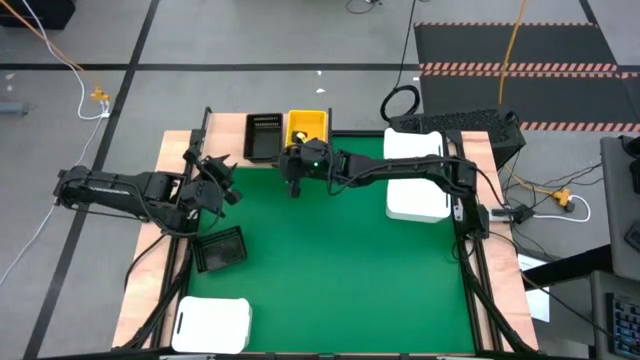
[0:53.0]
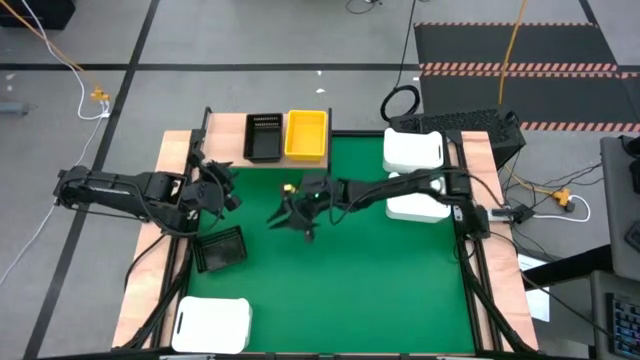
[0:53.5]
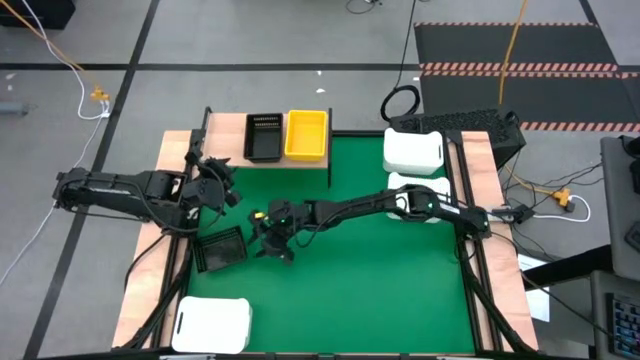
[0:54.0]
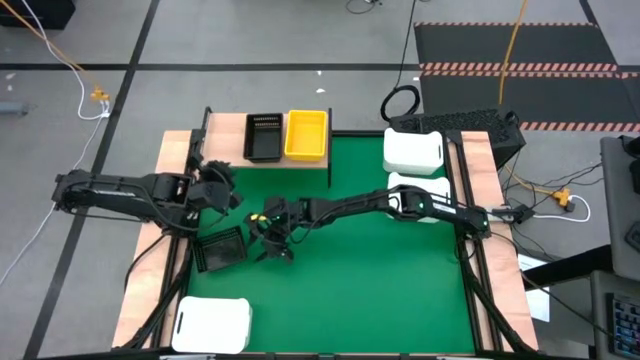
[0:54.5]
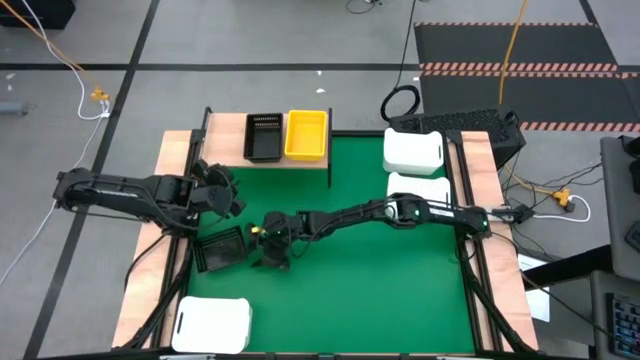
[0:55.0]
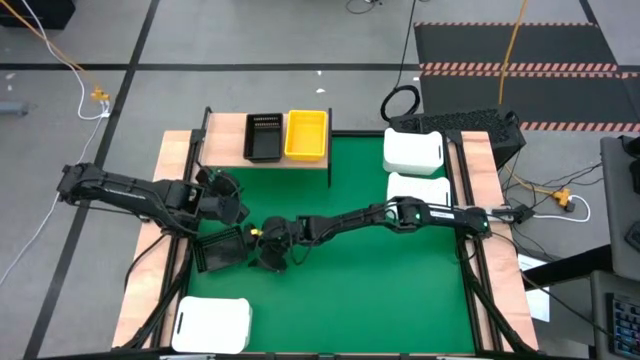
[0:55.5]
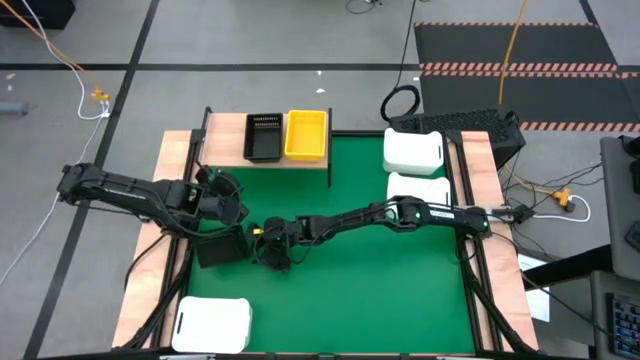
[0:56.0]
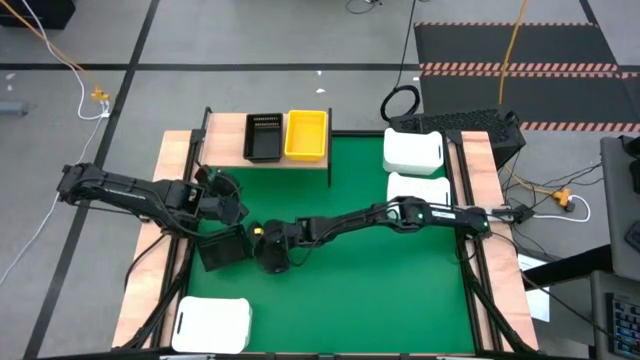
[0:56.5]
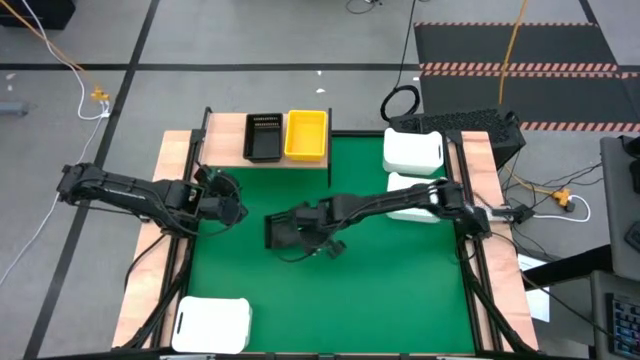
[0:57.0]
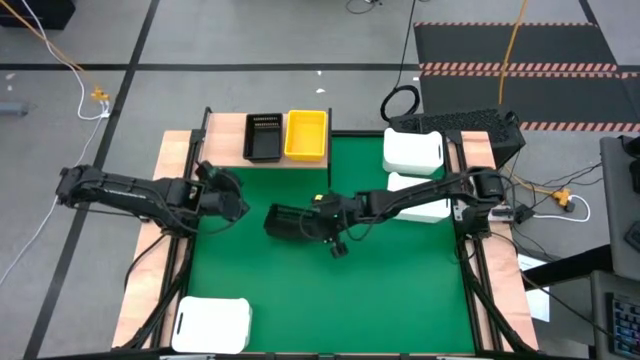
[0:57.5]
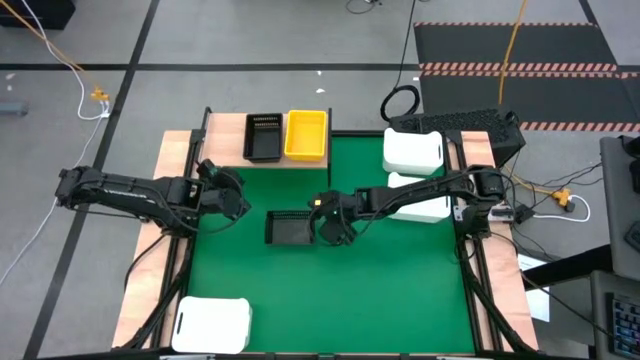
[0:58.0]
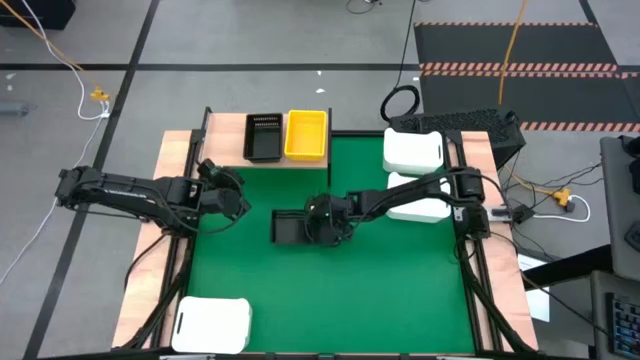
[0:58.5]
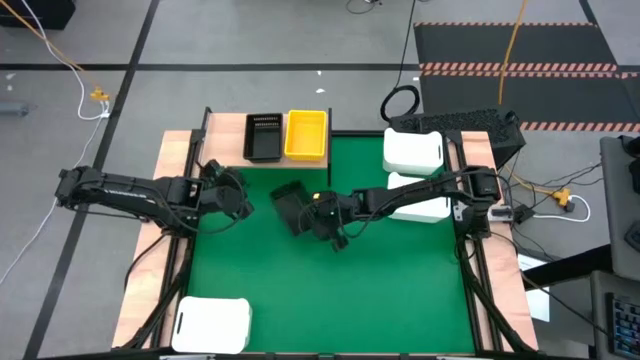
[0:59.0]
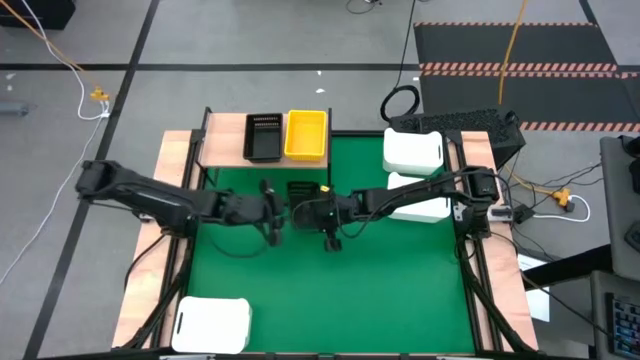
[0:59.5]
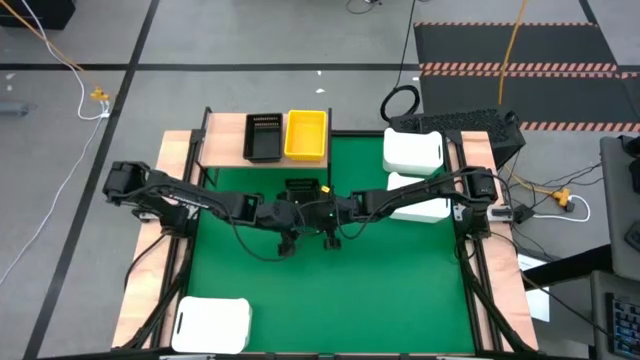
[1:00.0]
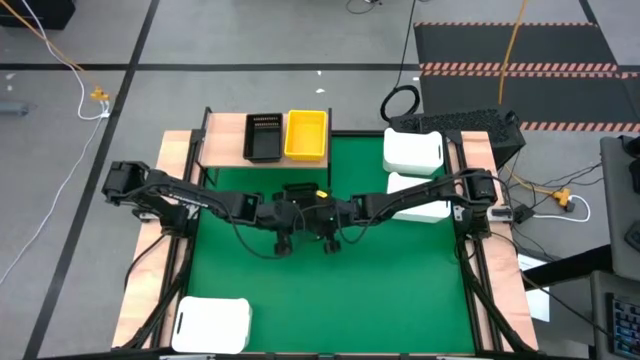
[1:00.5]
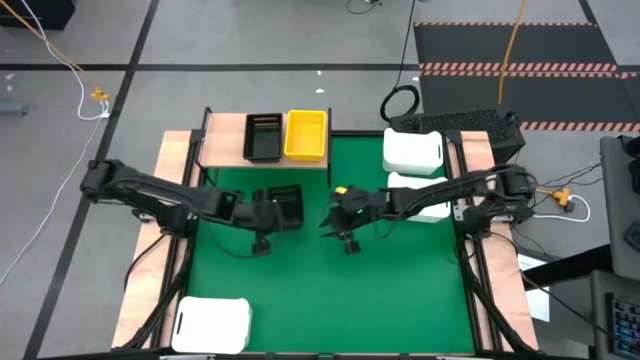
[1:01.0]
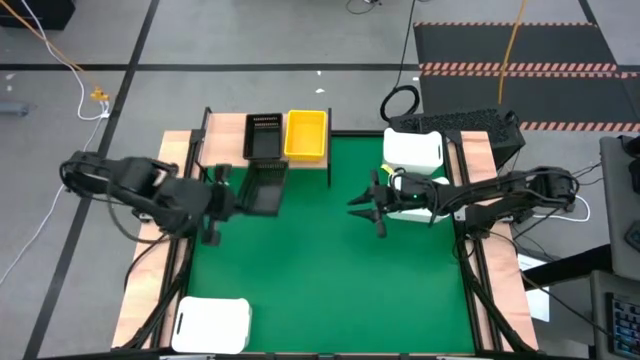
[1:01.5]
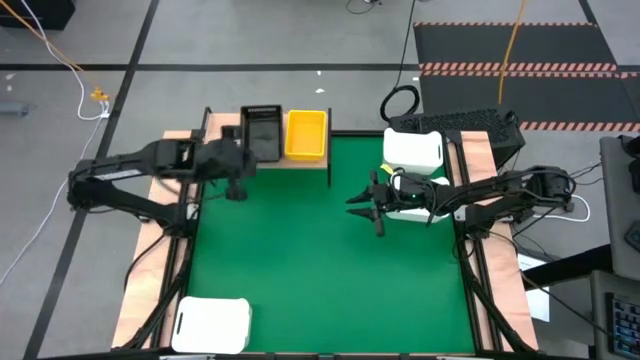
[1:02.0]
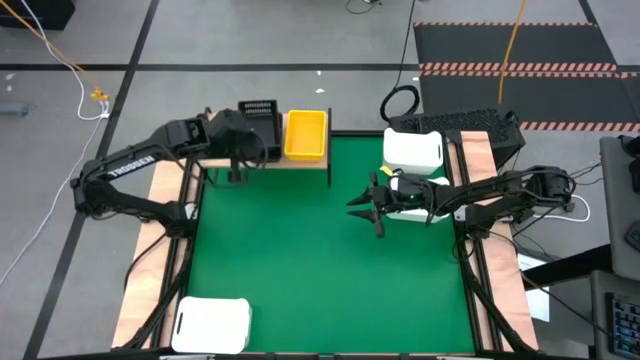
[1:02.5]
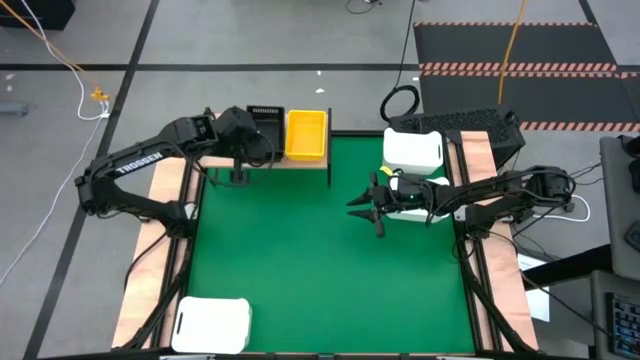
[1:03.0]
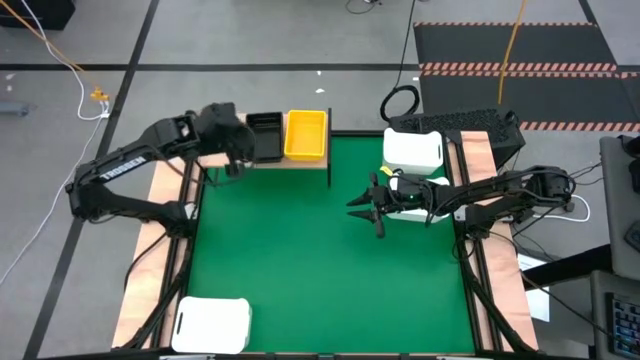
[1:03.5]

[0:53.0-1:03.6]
Task: Stack baskets on shelf by color
Stack the black bin on top of the other black bin on the shelf

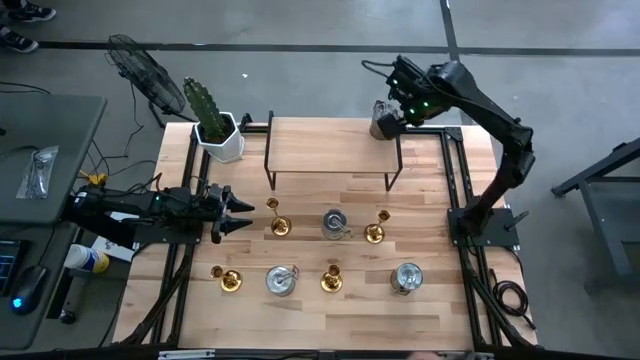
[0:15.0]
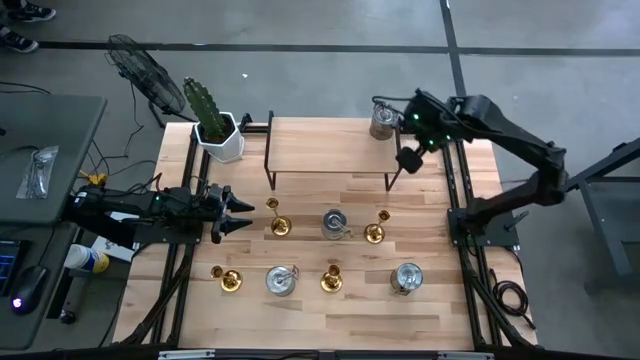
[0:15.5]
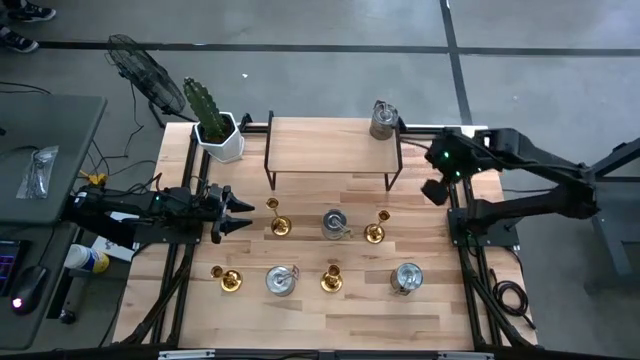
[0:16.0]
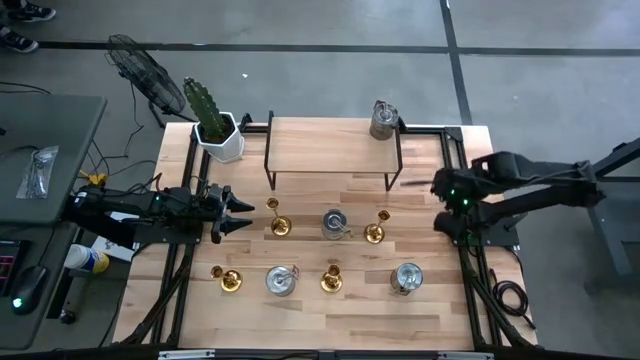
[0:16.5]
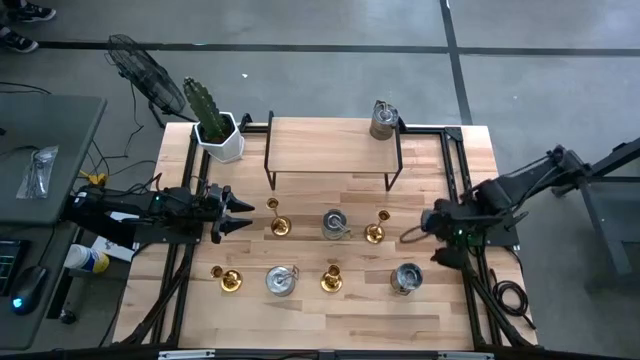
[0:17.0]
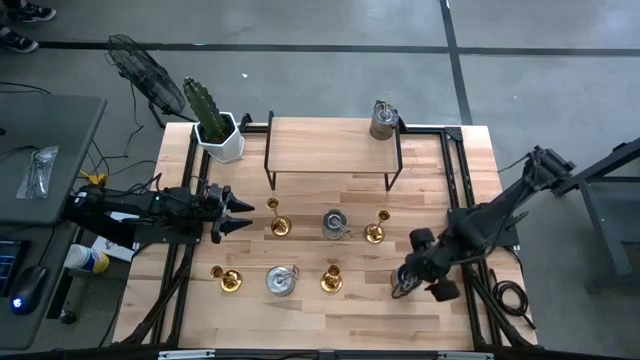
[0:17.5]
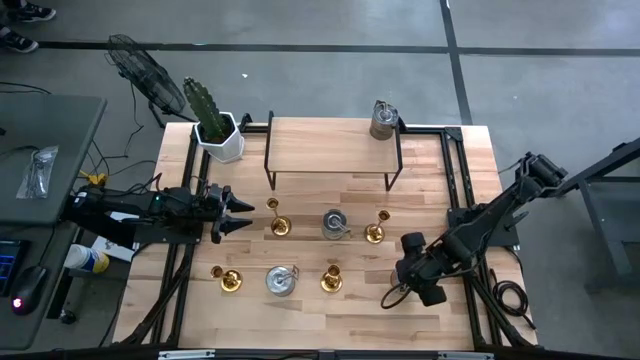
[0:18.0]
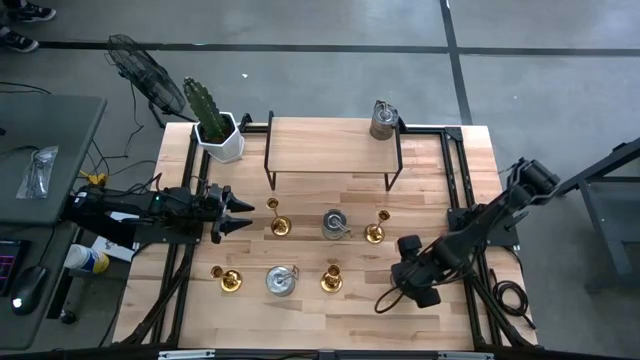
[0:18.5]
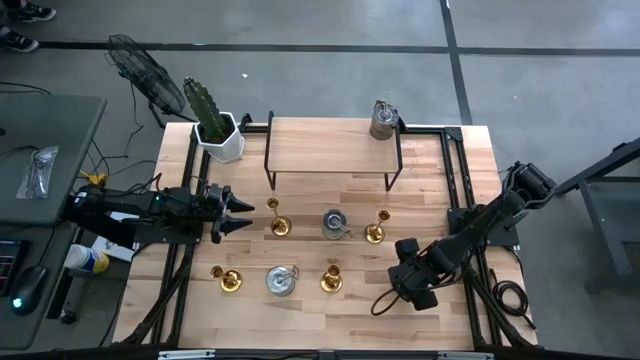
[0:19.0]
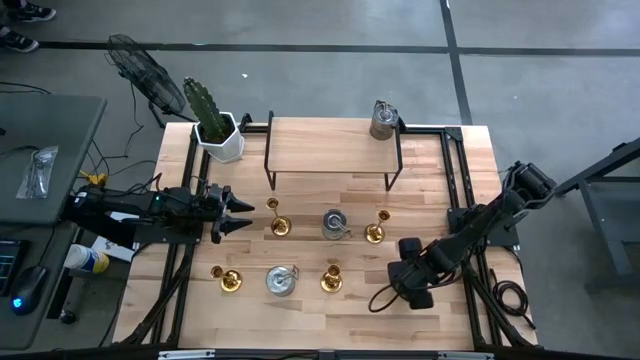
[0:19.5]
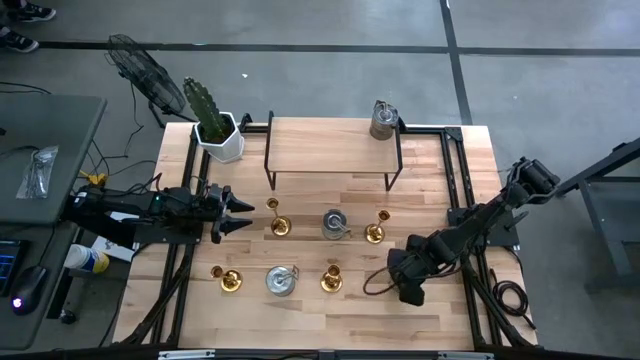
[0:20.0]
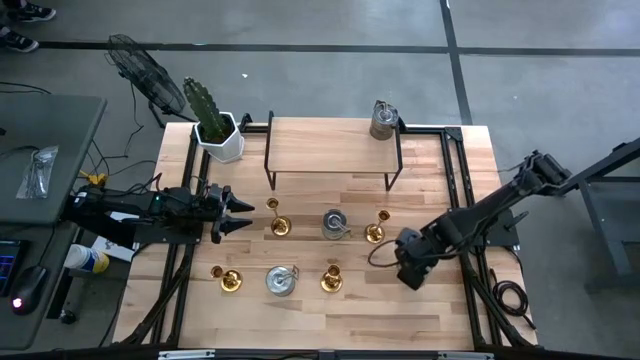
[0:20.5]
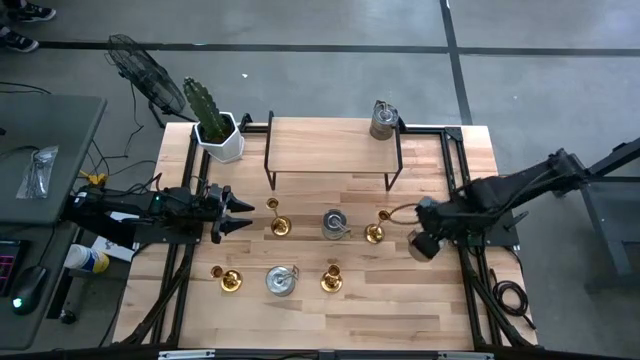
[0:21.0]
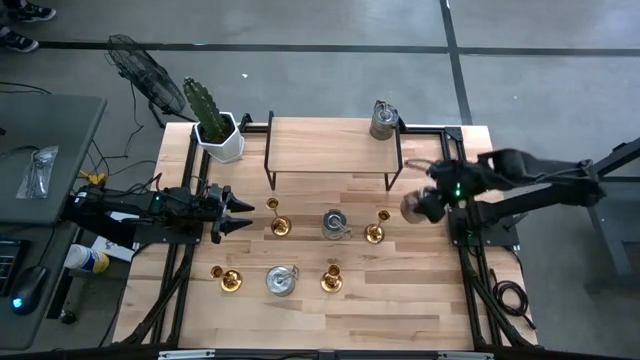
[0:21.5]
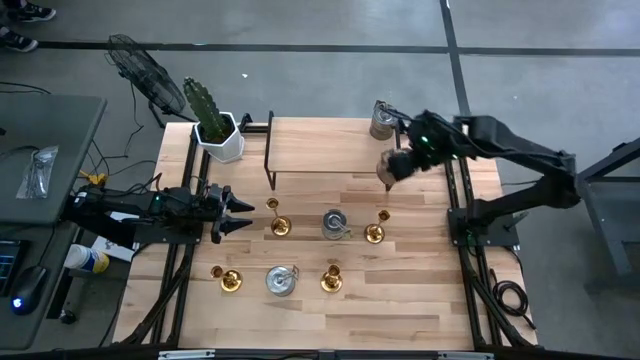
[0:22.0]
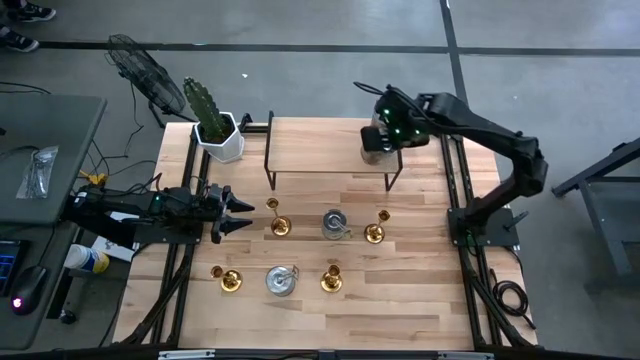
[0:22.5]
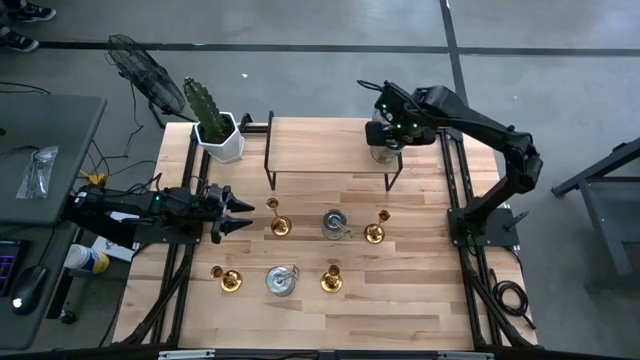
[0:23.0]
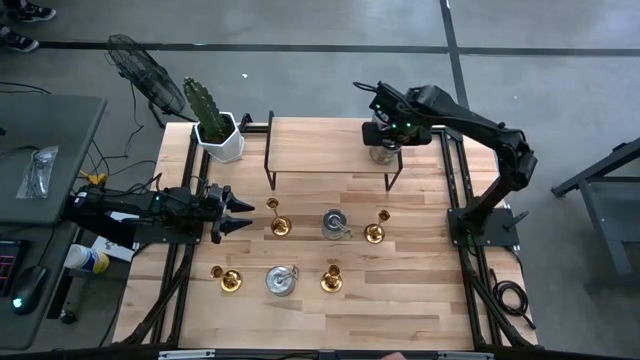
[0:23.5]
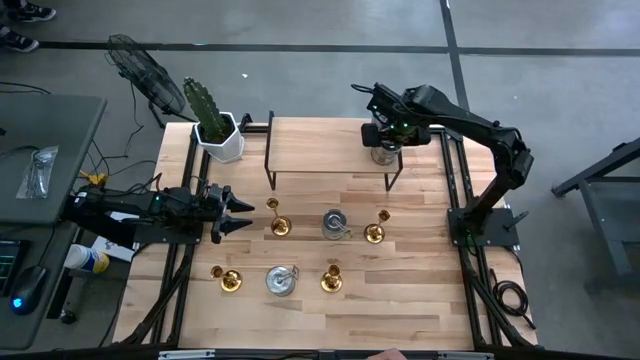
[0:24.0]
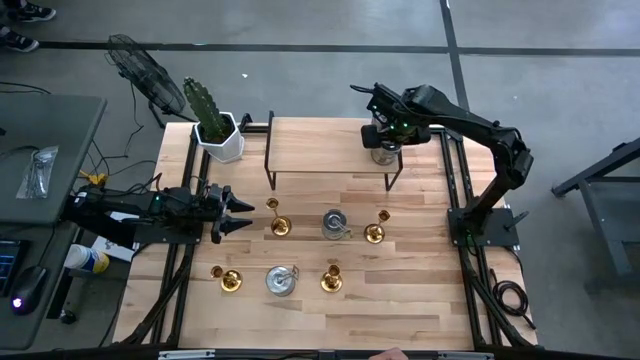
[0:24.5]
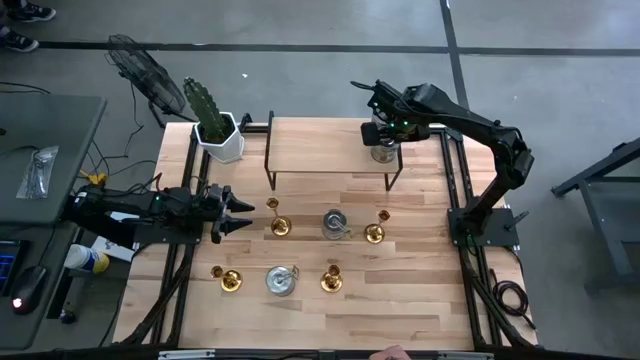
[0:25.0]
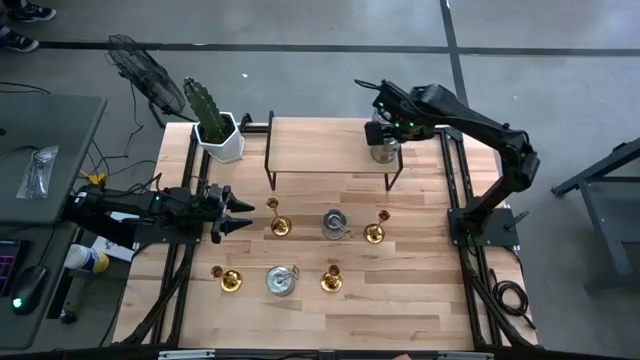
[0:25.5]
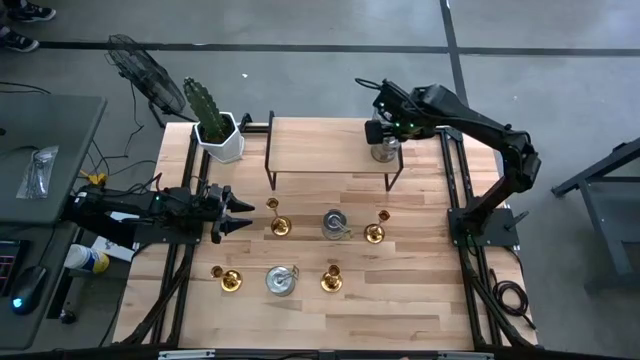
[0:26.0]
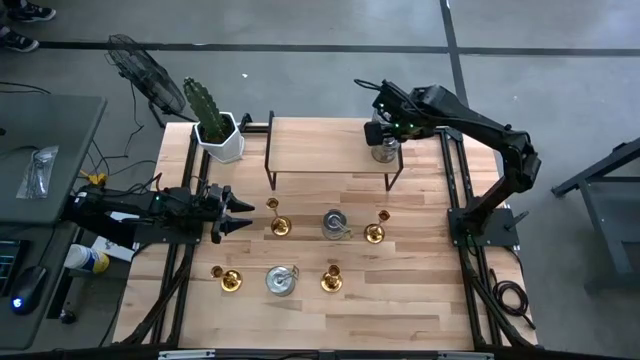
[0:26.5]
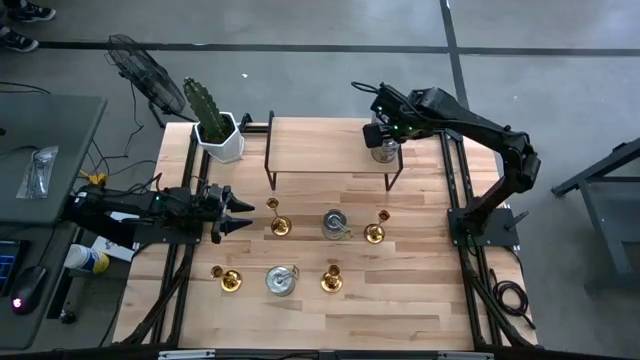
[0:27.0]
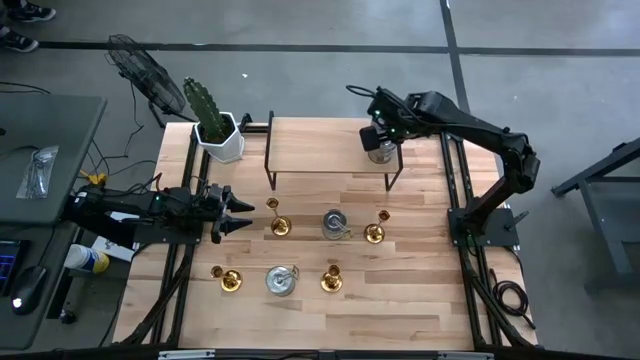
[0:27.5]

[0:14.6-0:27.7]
Task: Pick & Place candle stick holders
Align the silver scented candle with the other silver scented candle on the shelf
